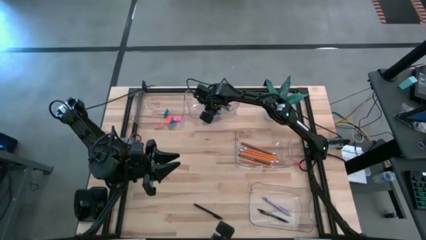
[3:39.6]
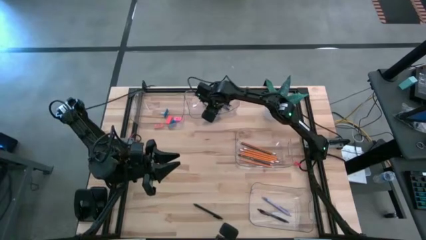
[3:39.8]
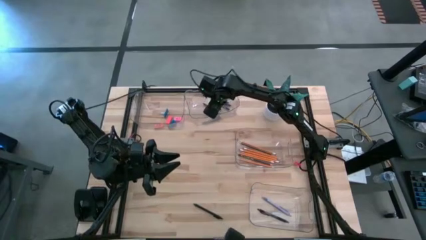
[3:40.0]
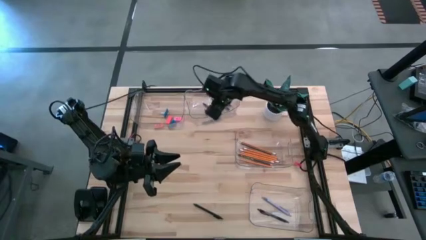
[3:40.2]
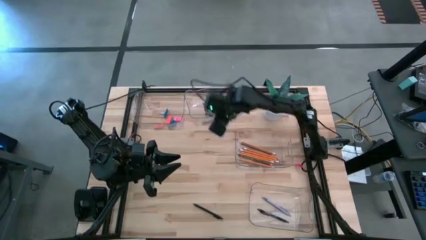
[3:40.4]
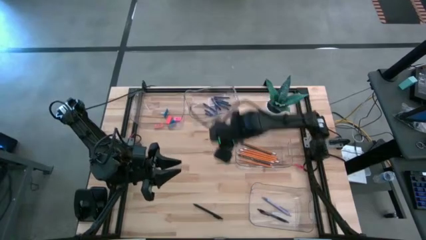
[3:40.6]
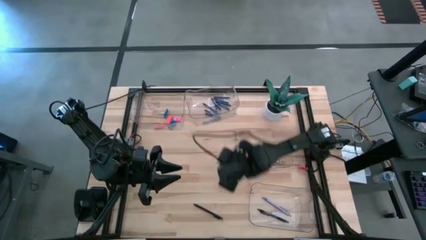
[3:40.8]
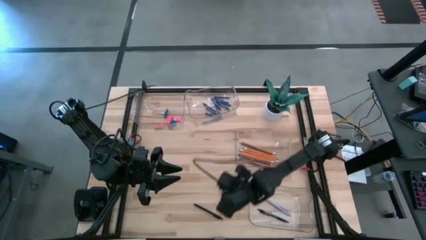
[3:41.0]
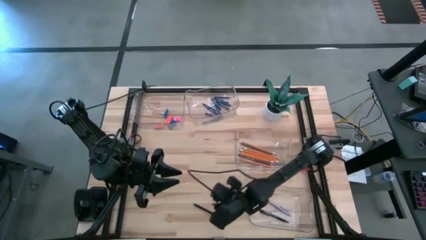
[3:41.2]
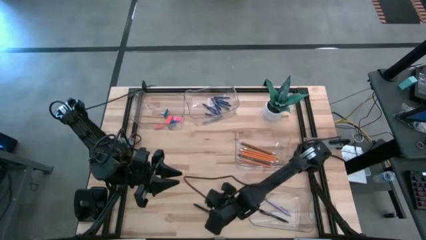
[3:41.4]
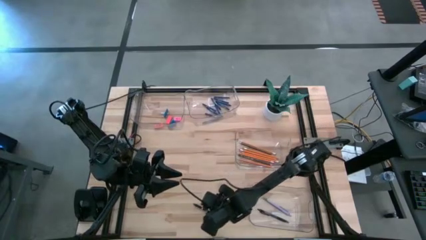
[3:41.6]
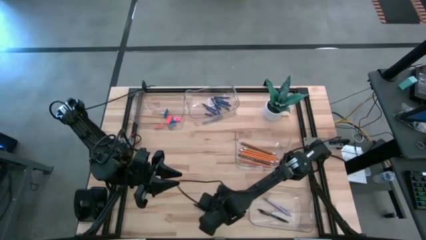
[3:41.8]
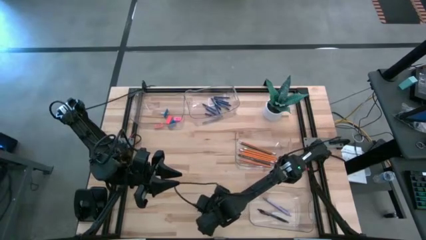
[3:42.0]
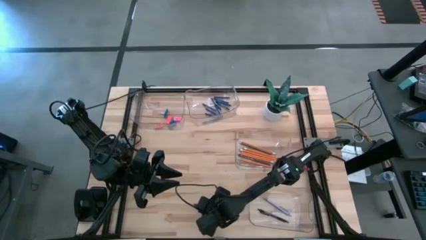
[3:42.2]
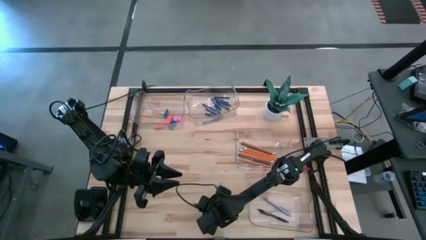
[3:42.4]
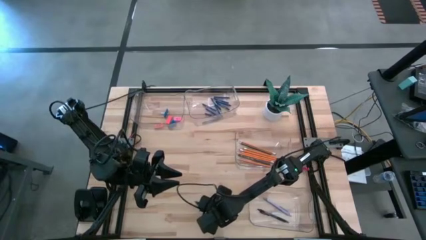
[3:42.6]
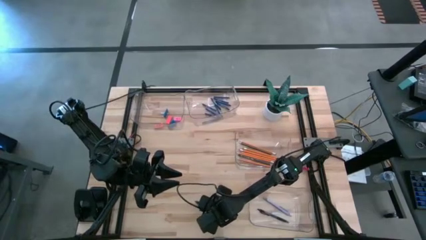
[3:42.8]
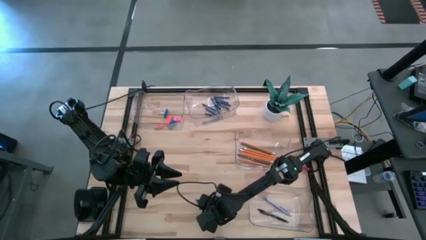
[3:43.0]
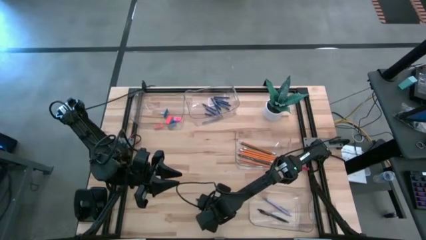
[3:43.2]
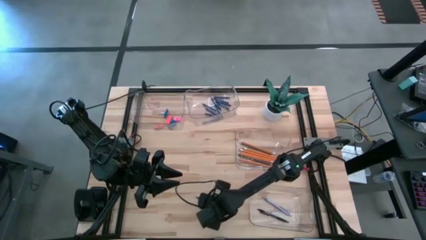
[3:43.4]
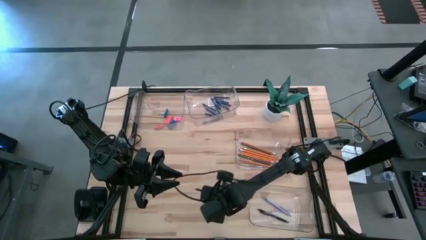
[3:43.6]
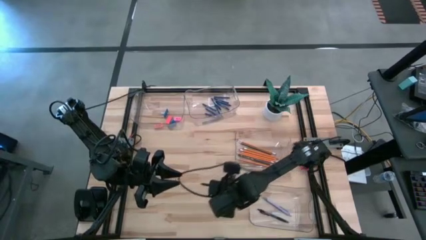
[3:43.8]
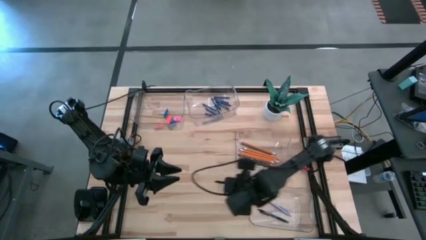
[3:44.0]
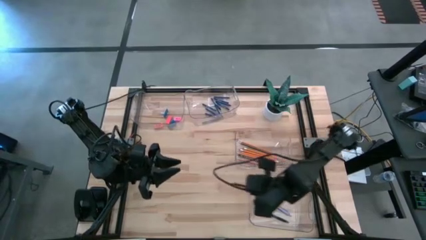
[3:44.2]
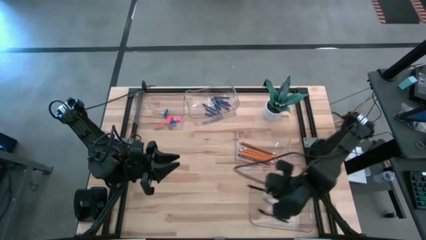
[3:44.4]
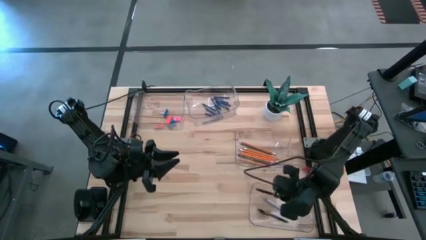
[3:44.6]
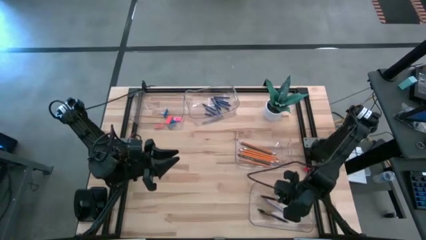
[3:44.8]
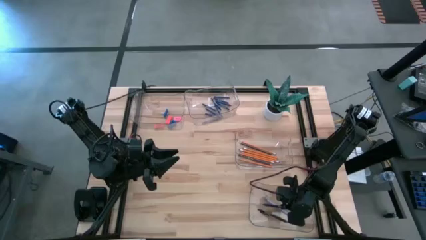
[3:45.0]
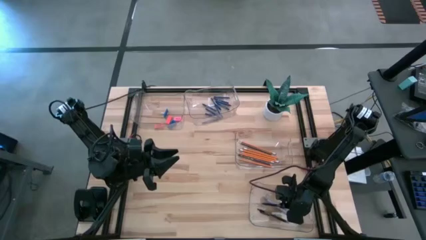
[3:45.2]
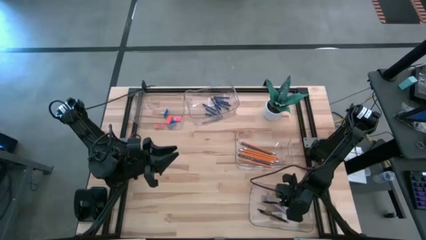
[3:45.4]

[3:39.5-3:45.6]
Task: Sort crayons/erasers/pens/pencils in bins
Put the black pen into the bottom transparent bin

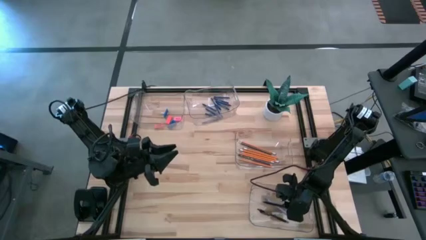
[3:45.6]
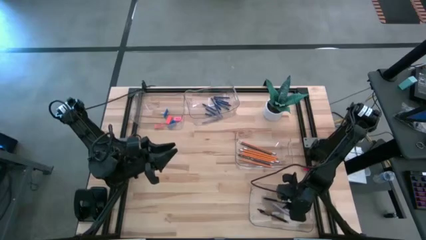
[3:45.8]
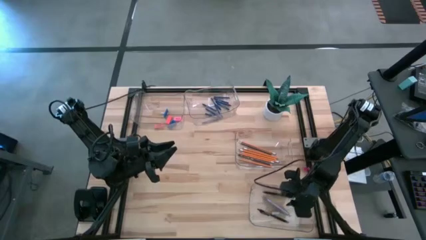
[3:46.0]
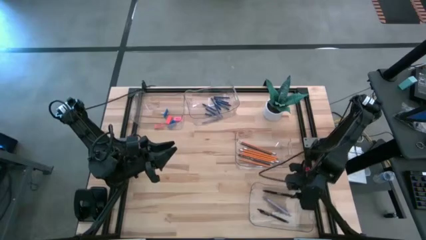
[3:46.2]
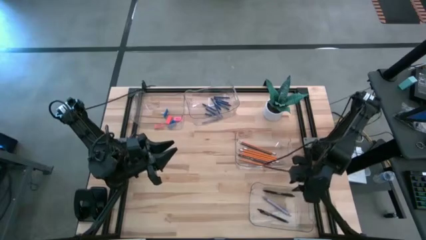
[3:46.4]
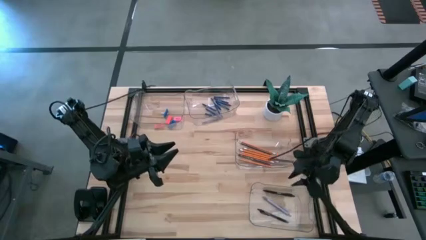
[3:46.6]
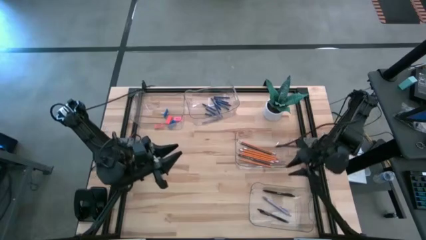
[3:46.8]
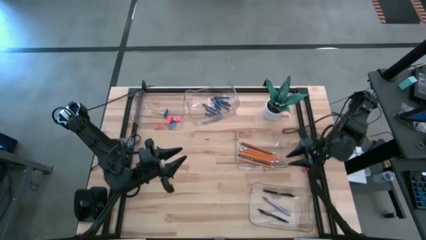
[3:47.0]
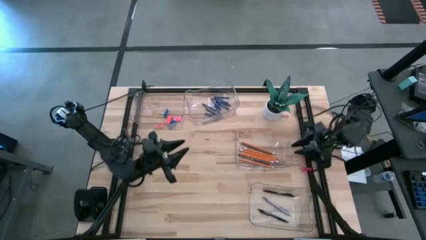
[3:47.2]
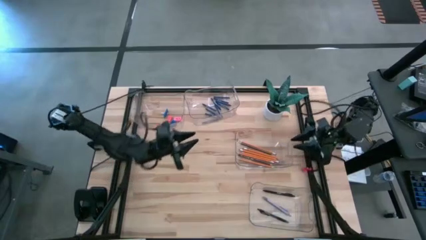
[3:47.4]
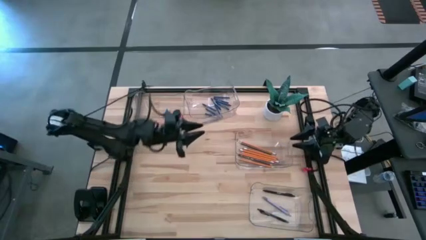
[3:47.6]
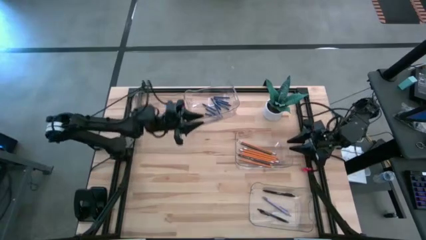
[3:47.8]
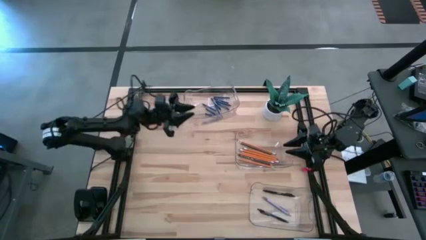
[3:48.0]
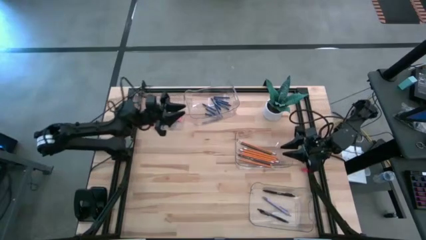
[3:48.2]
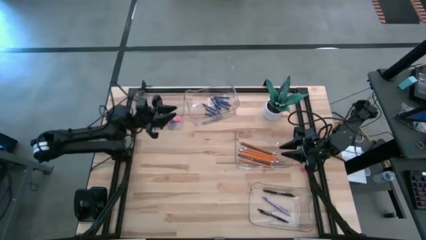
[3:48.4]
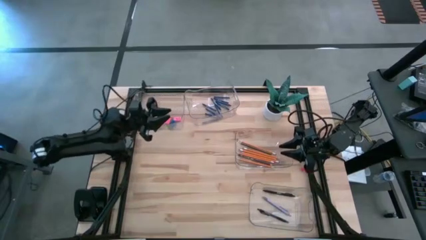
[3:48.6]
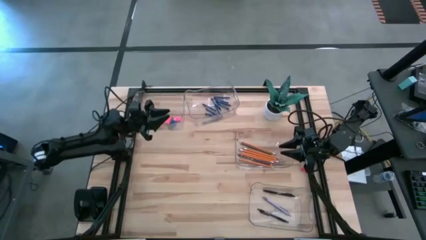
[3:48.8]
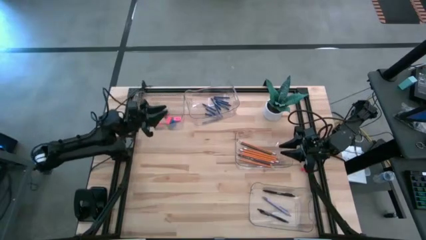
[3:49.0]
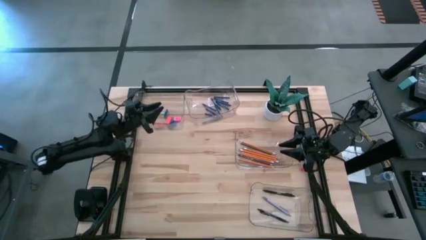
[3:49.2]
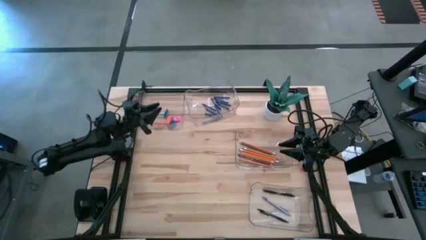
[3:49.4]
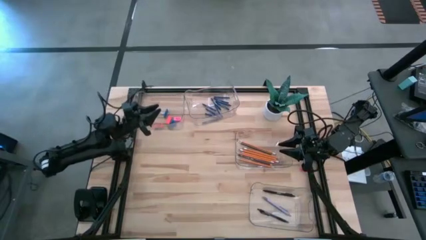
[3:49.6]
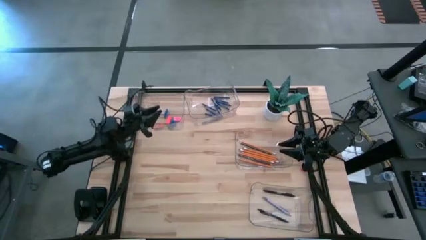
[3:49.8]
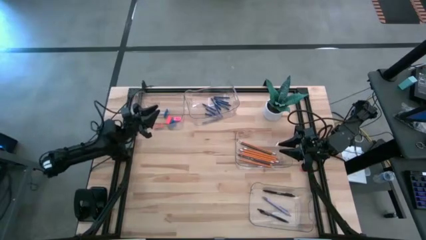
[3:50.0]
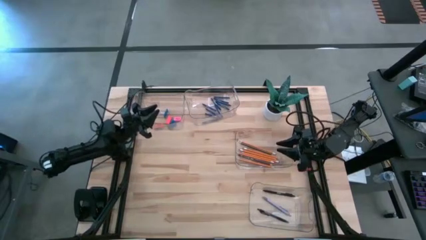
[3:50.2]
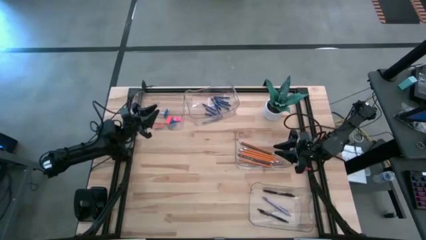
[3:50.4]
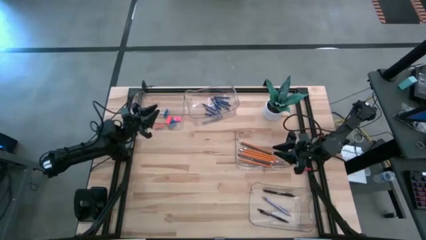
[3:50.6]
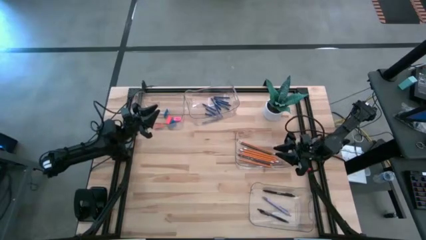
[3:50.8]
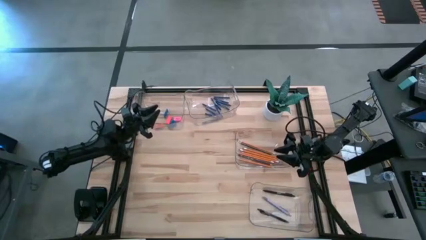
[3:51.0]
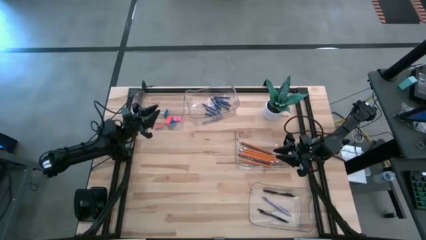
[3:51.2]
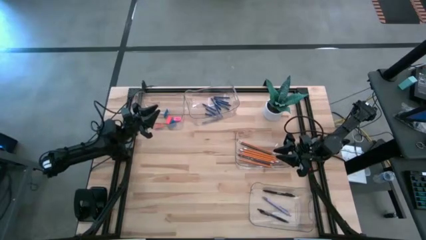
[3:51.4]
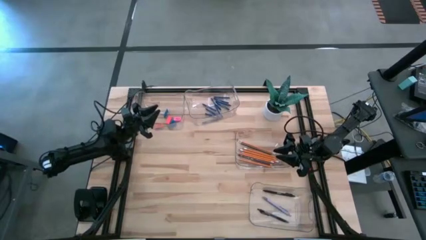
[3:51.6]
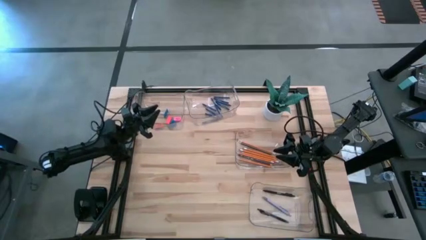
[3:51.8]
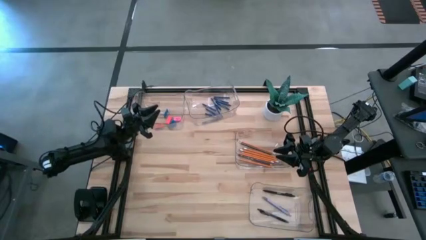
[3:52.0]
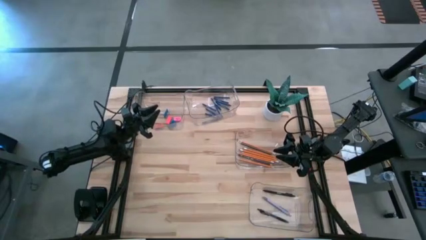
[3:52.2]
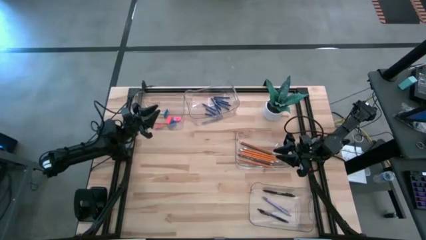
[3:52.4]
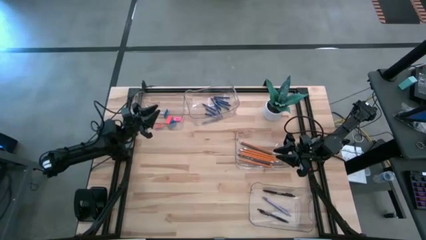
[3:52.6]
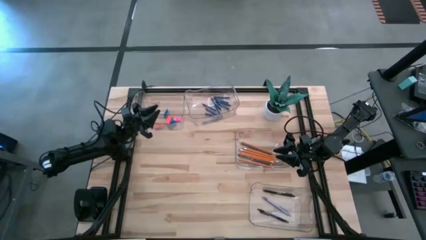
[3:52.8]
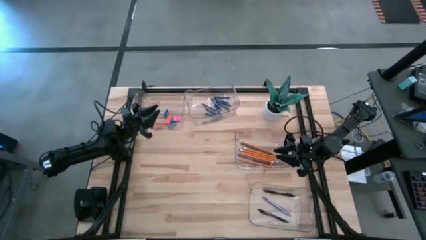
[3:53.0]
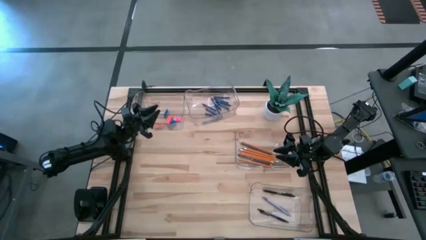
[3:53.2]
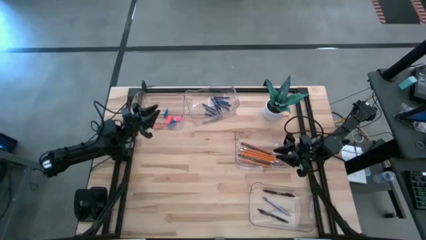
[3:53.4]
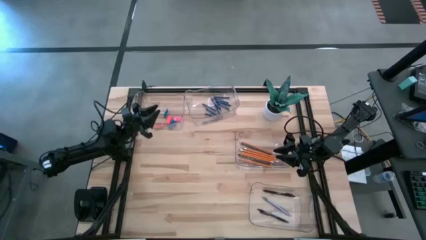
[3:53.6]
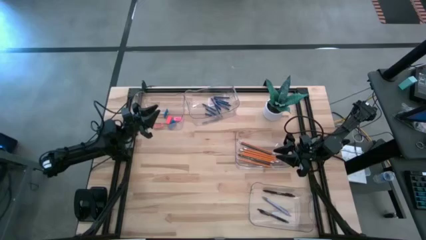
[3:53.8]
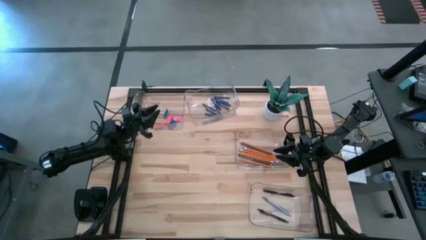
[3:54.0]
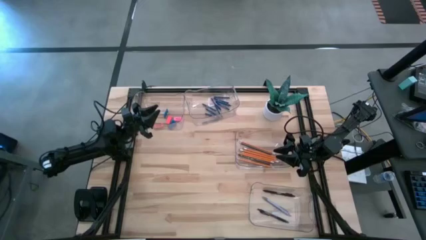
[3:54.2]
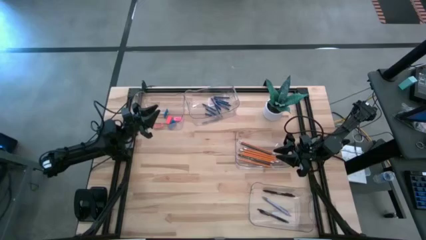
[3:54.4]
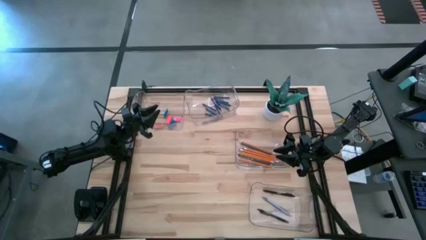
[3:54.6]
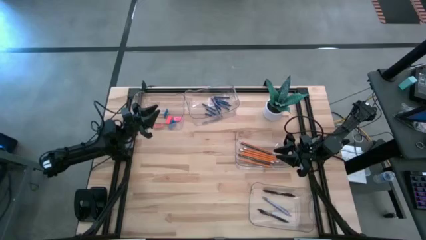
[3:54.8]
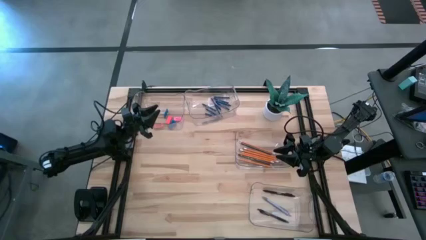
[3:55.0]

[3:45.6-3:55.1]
Return to Home Position
